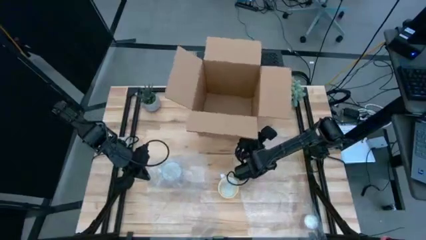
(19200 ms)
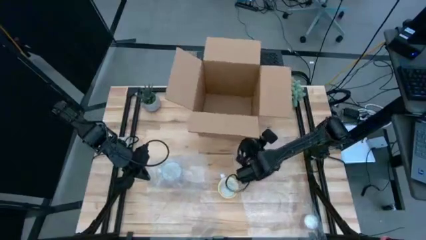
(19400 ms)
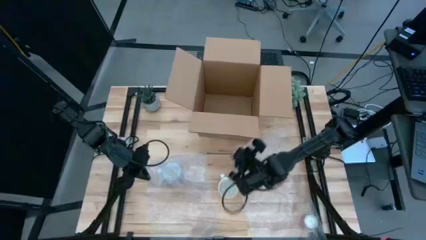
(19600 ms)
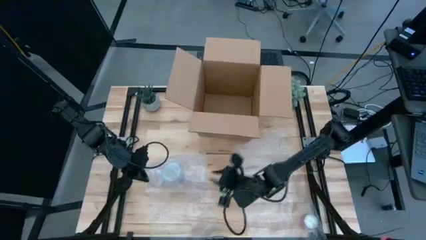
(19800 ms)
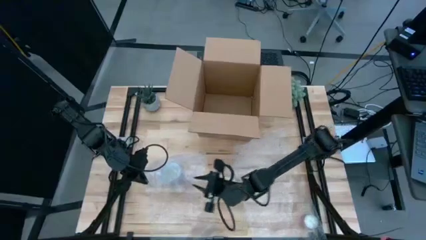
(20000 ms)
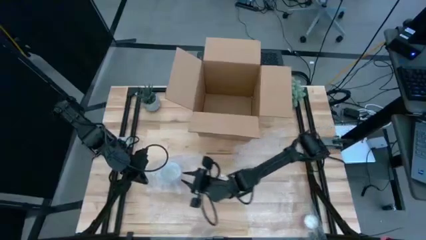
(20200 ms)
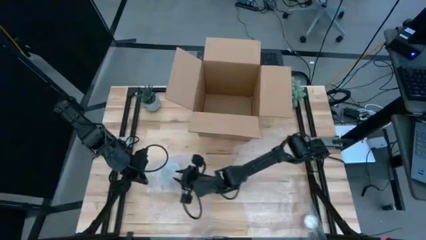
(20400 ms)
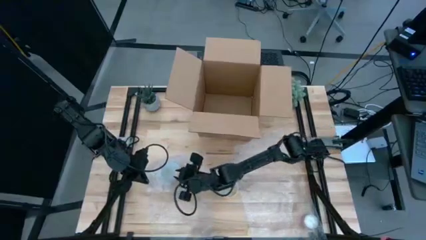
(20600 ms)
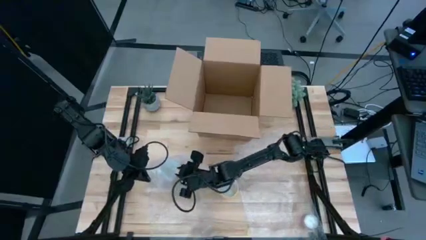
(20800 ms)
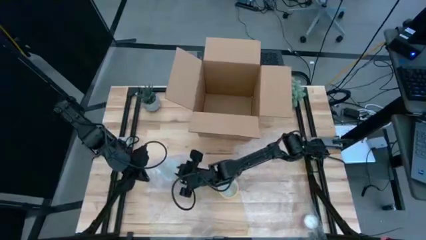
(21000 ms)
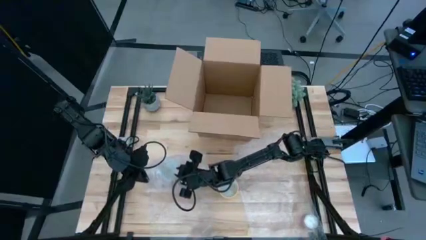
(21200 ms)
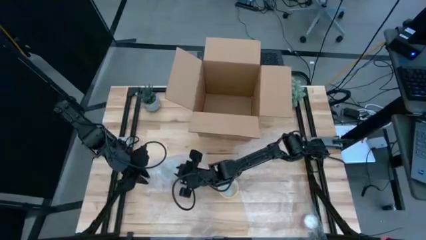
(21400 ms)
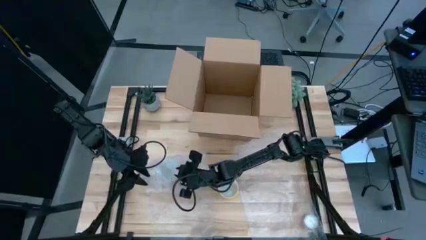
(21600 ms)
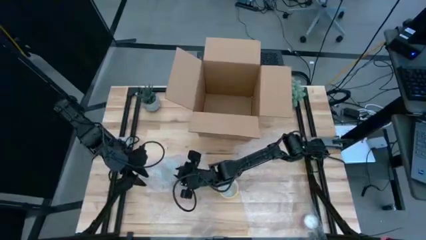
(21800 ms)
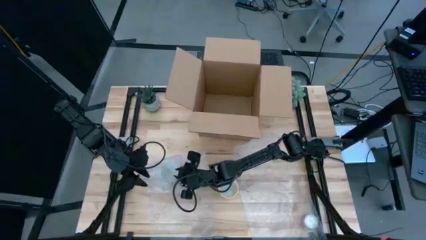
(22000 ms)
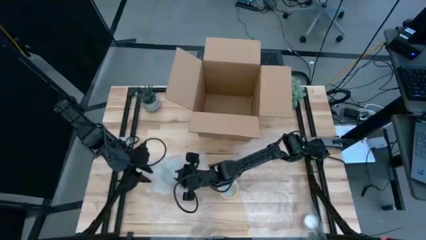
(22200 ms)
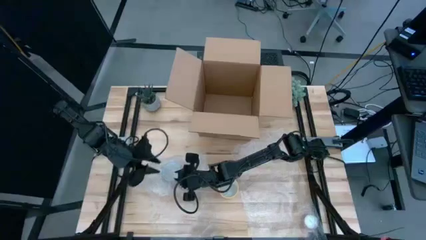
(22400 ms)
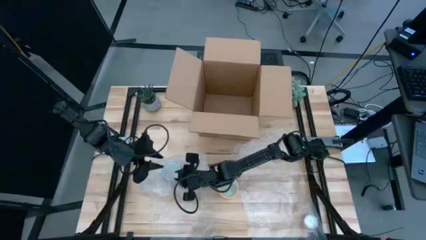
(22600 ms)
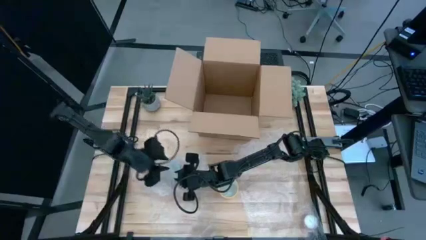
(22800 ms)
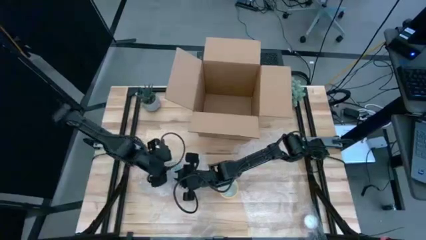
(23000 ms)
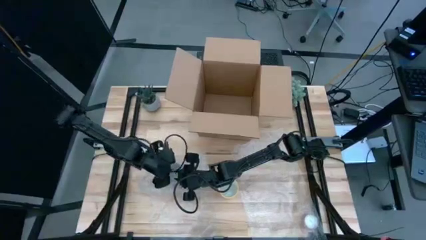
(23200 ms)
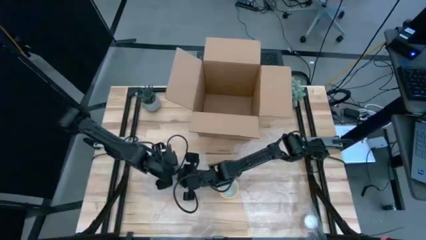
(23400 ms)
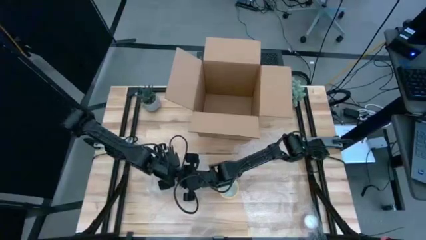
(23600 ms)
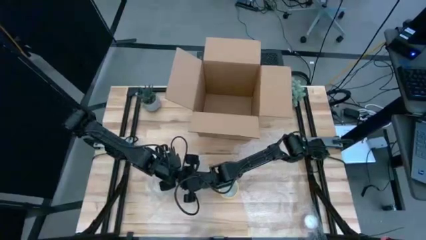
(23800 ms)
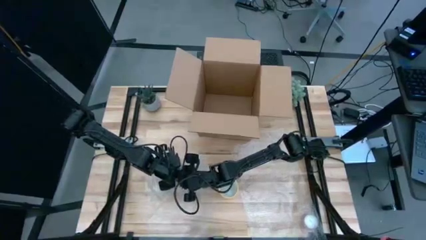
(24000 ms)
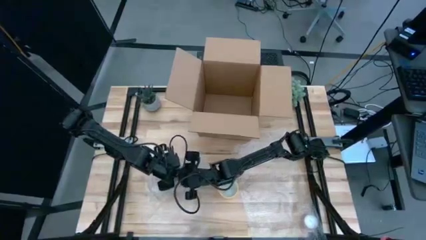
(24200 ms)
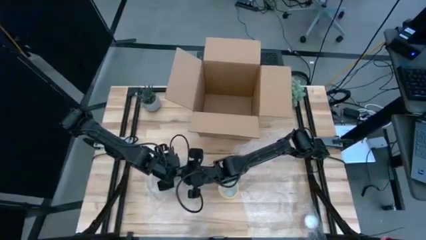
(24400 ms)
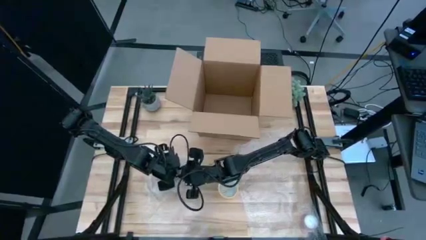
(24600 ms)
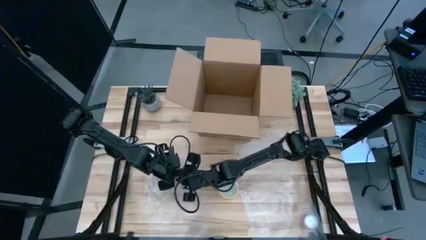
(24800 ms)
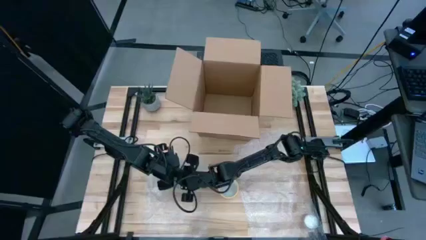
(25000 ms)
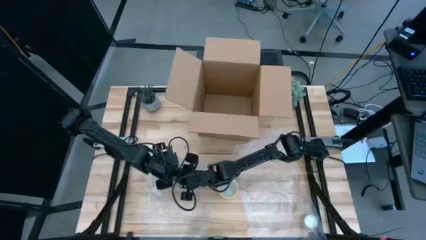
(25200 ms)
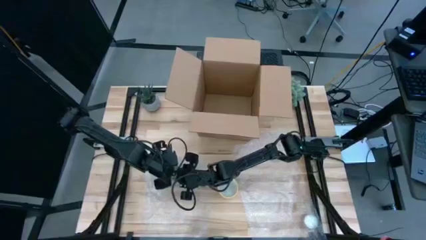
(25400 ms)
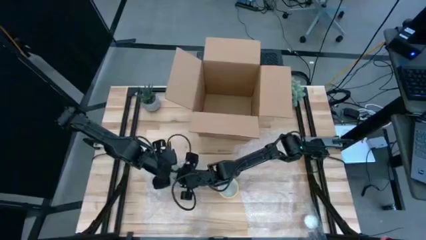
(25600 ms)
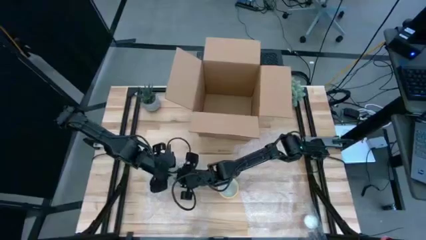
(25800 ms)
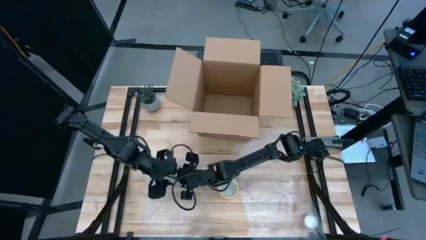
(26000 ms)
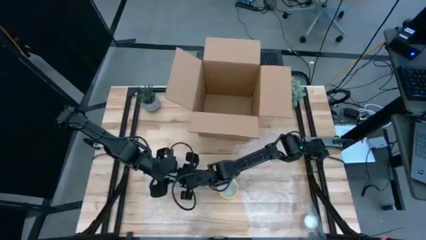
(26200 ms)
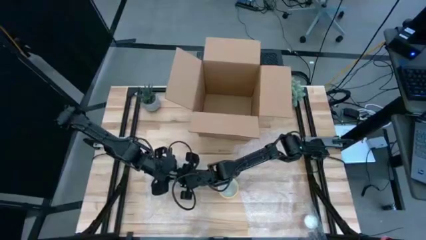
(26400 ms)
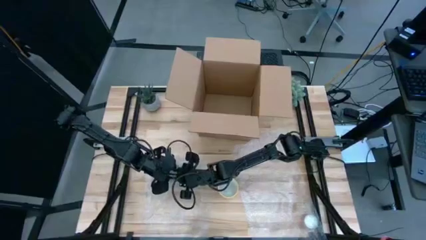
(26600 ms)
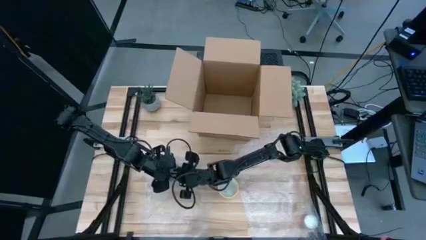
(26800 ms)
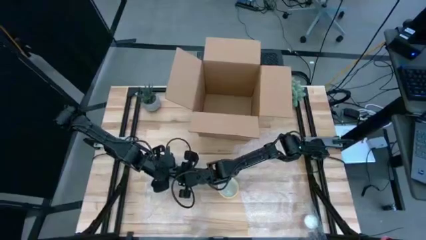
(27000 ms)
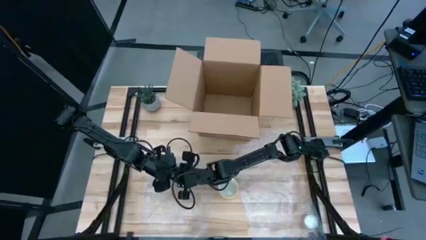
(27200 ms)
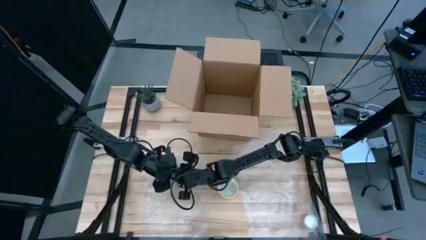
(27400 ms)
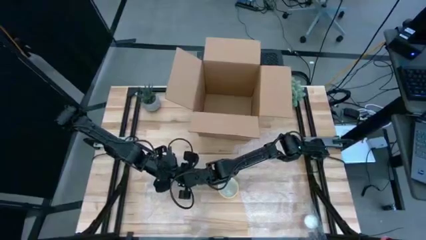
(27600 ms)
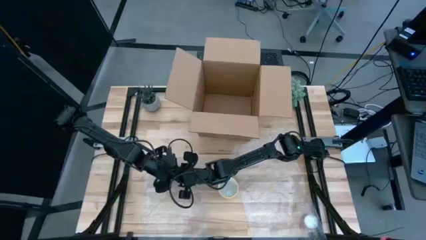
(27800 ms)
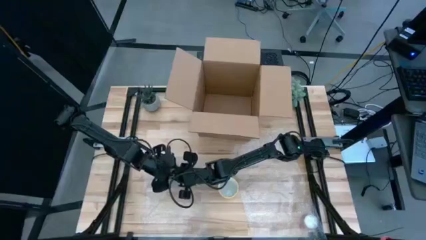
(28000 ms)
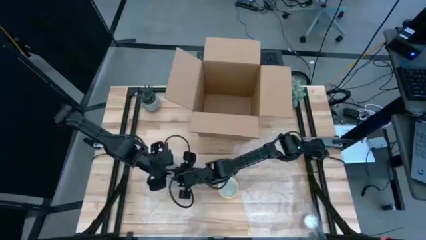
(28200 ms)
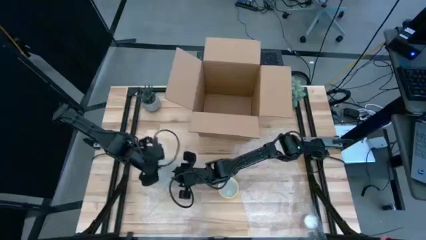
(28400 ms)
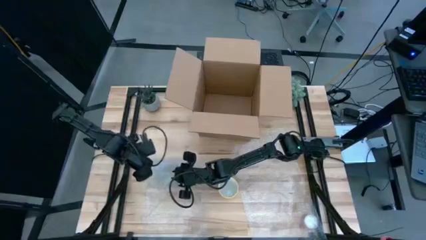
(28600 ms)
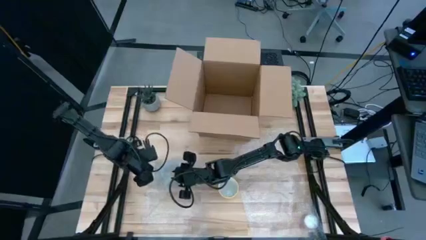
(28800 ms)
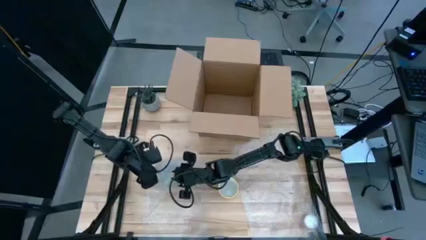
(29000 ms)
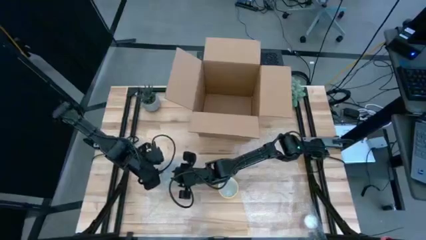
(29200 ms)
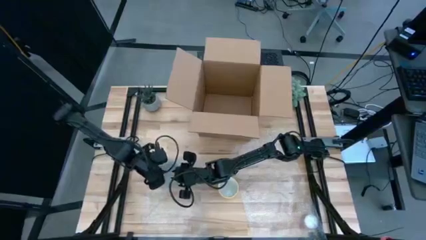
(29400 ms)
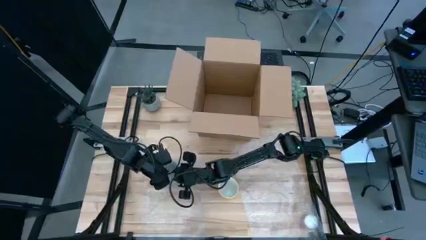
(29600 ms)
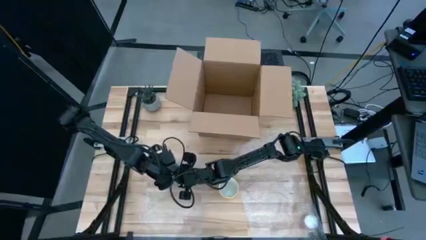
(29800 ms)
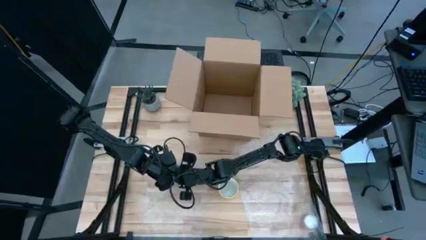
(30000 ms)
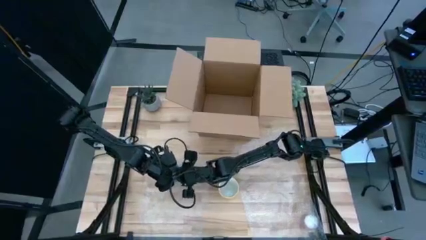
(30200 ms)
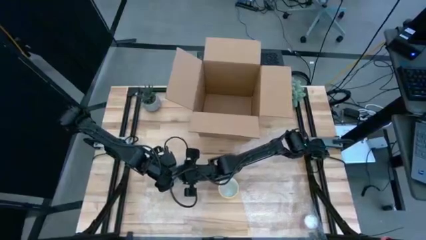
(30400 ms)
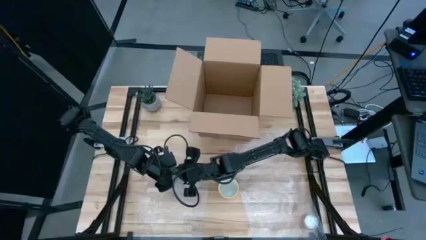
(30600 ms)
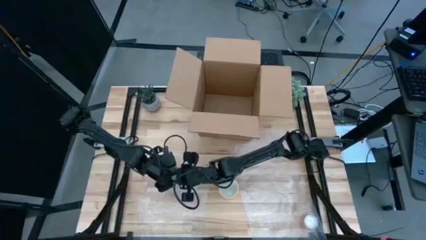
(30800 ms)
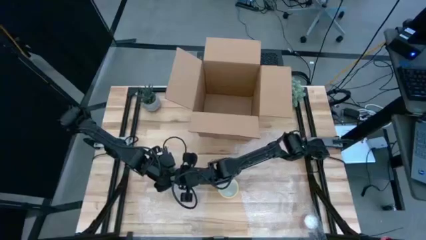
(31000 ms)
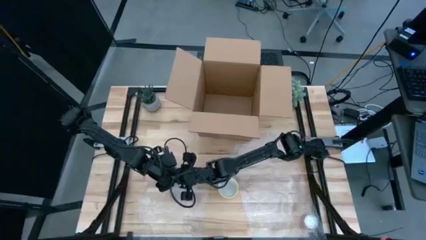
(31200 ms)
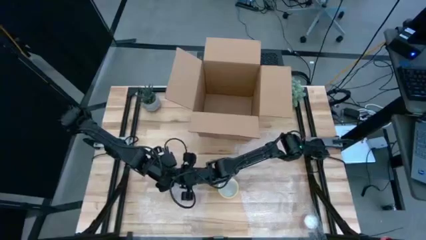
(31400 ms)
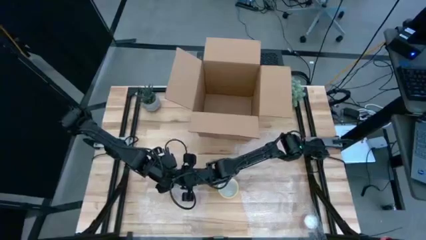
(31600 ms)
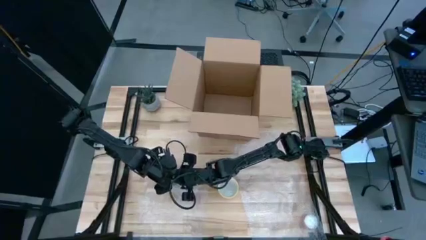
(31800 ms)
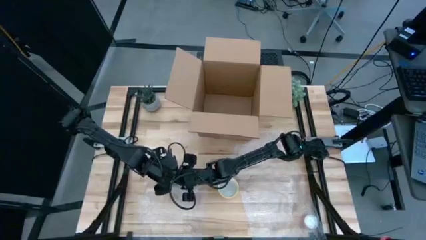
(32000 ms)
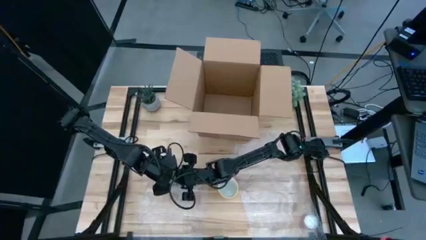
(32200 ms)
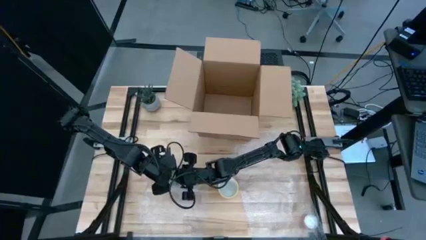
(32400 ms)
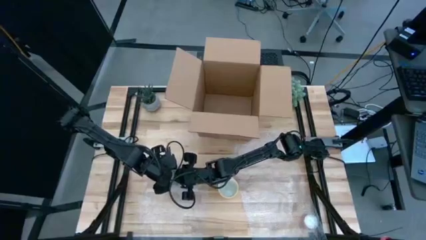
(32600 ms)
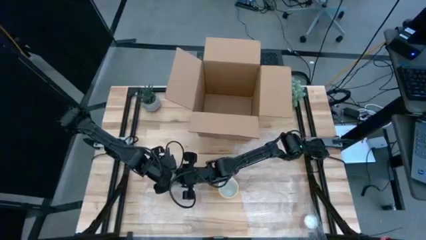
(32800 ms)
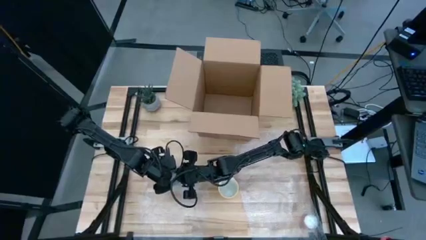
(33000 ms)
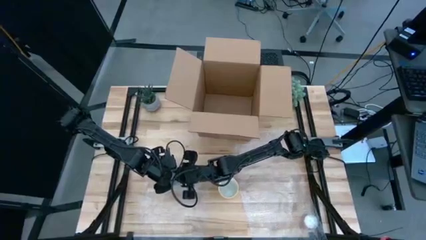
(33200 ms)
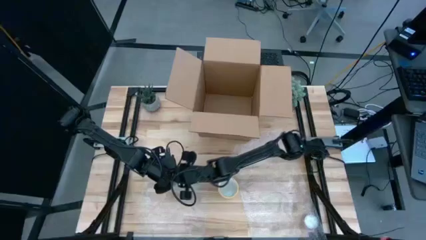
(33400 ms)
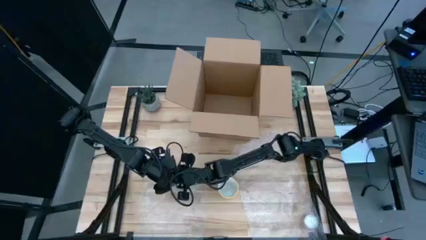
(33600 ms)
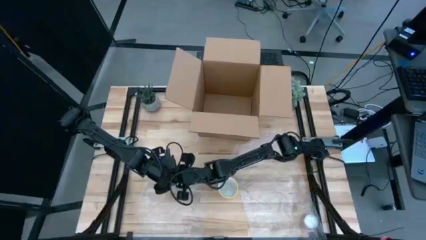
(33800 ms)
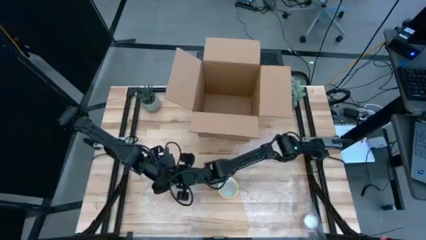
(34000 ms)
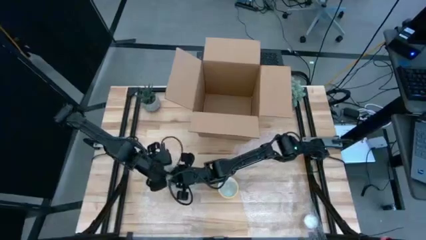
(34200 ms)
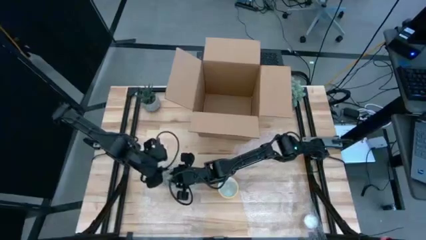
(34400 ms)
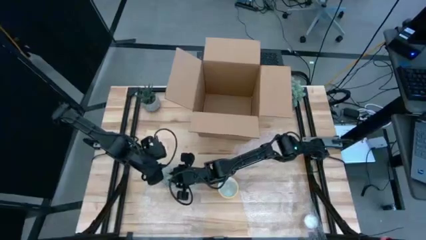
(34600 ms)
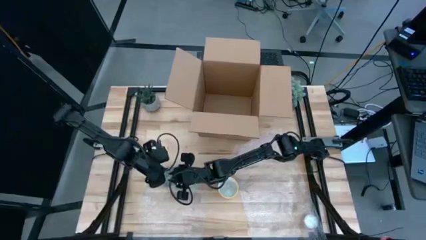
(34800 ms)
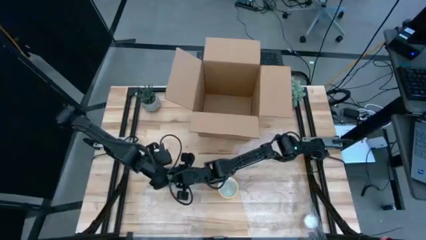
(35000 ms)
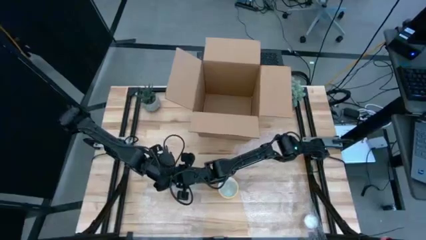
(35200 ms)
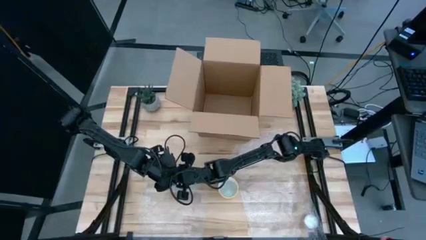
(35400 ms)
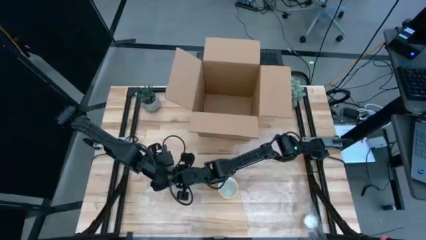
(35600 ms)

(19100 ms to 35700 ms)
Task: wrap mug
Wrap the red mug with the bubble wrap

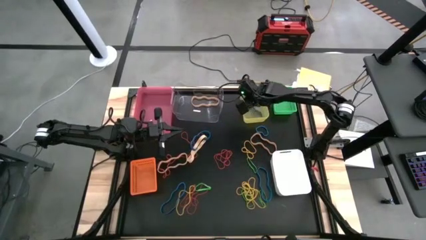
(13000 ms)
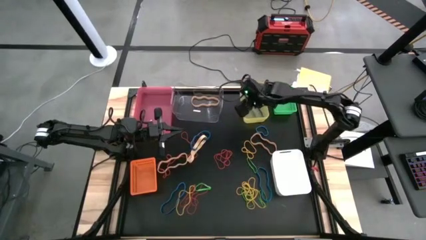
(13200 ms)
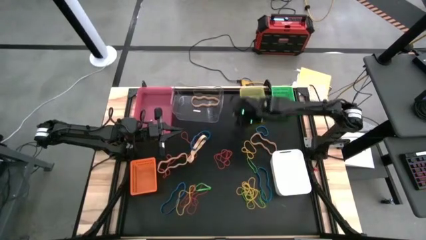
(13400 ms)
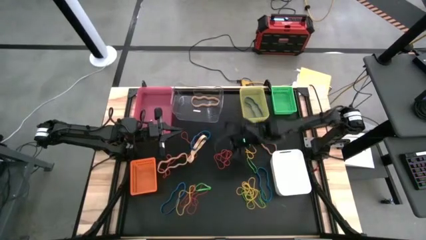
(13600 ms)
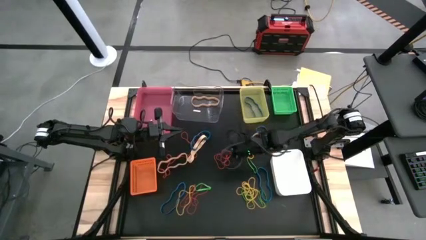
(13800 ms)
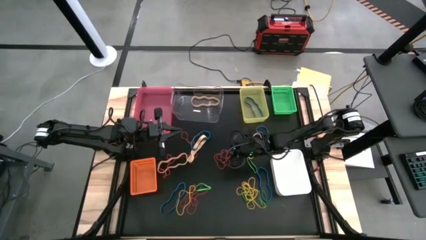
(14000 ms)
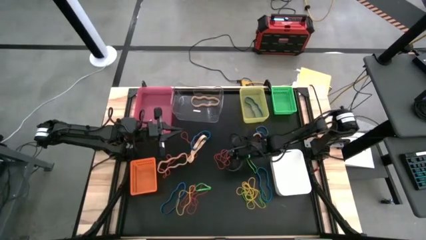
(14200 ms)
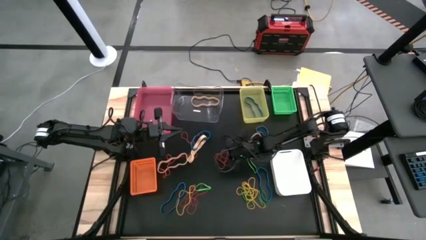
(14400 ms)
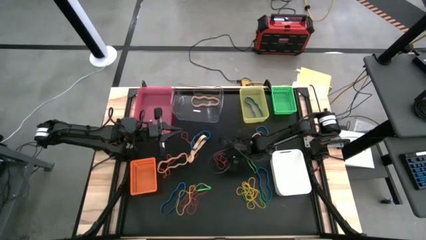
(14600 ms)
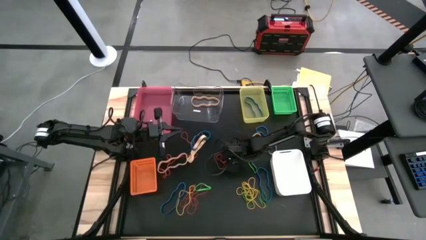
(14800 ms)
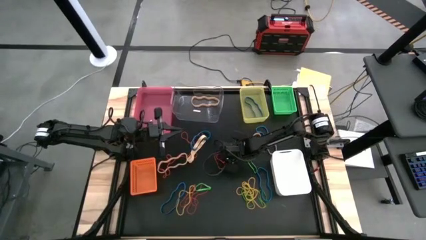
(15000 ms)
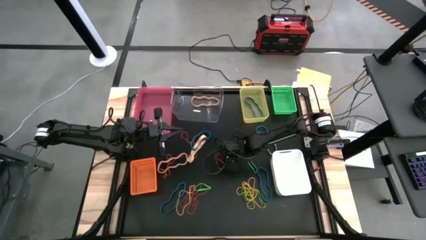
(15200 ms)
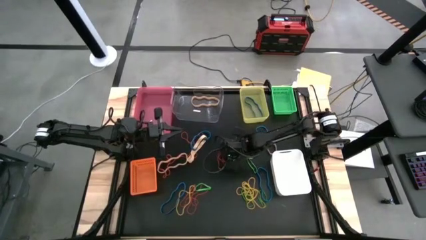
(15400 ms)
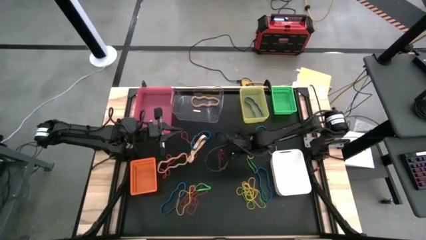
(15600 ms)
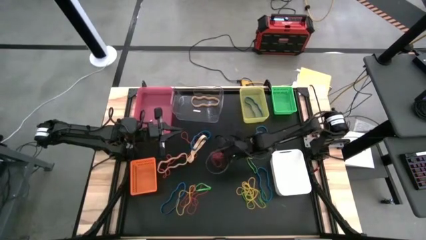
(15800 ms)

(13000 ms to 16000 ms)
Task: Sort rubber bands into baskets
Put the red rubber band into the white bin
